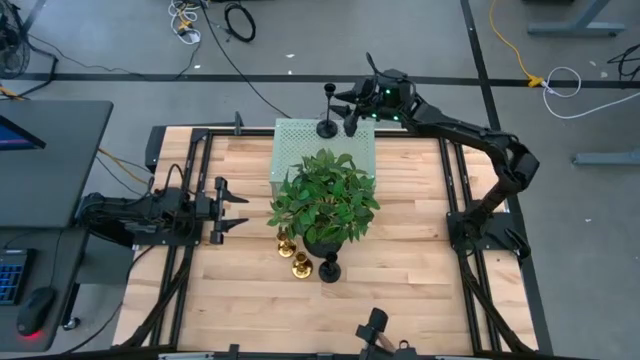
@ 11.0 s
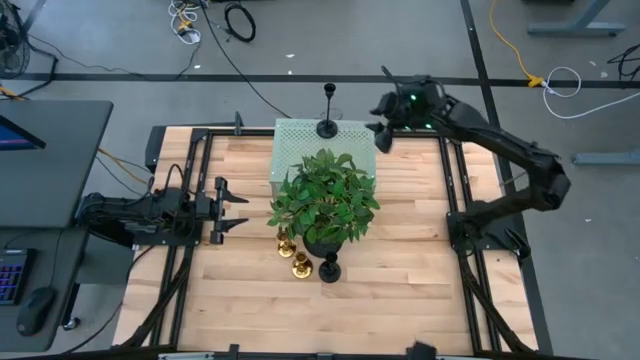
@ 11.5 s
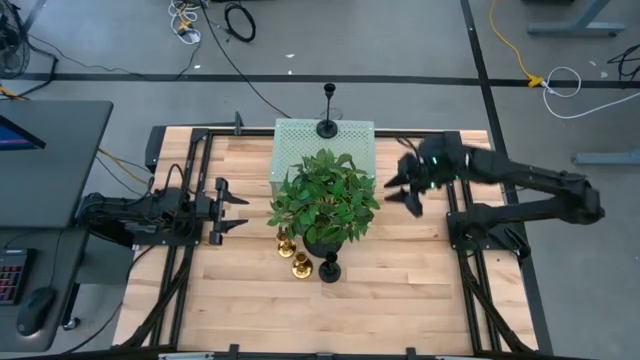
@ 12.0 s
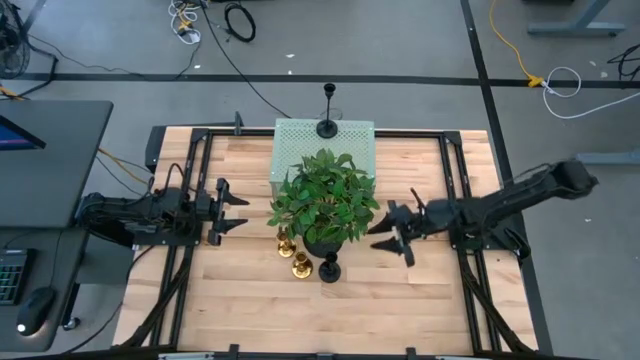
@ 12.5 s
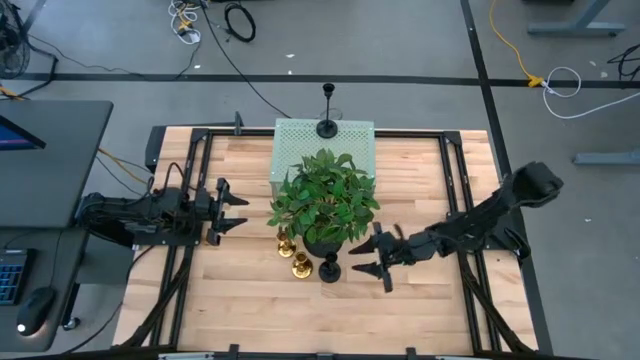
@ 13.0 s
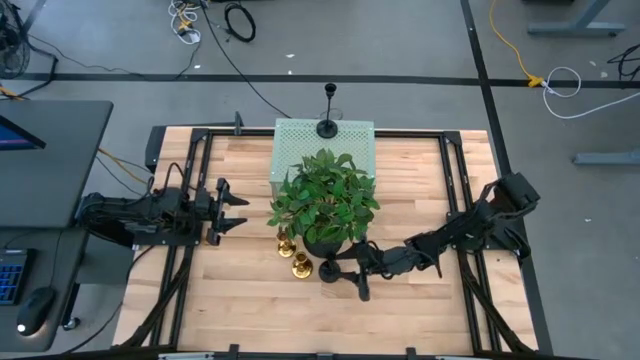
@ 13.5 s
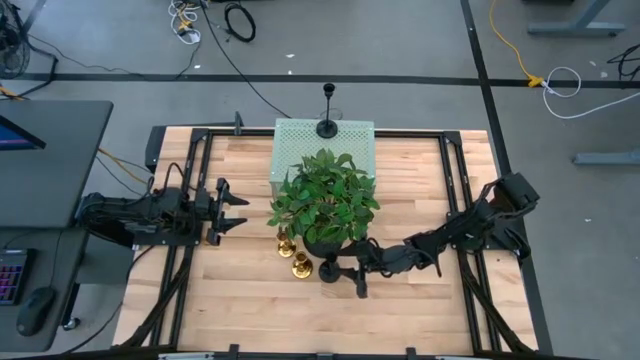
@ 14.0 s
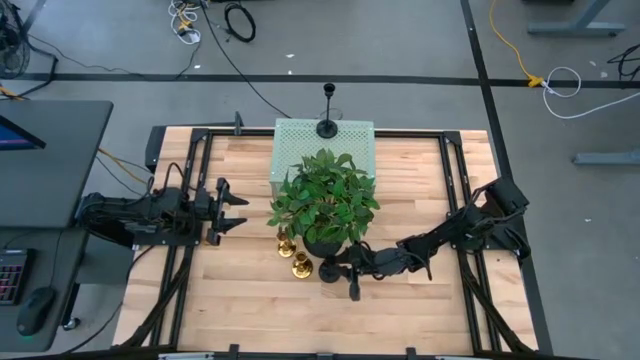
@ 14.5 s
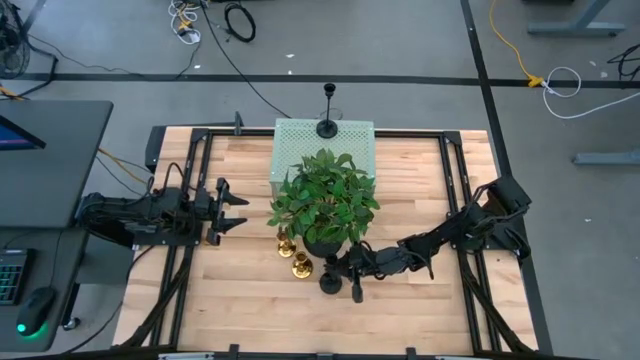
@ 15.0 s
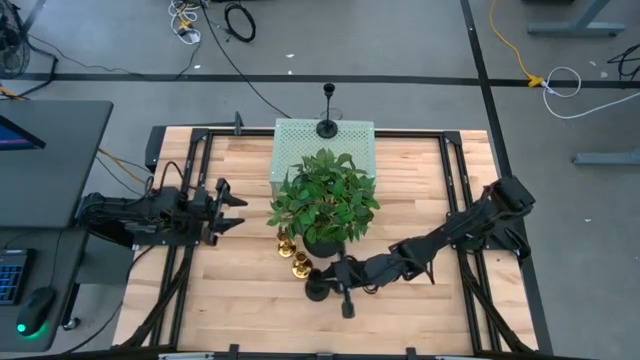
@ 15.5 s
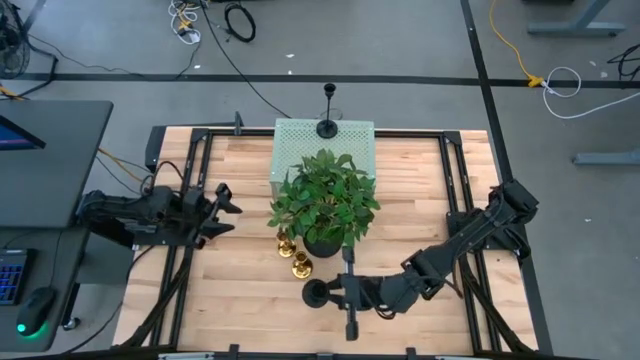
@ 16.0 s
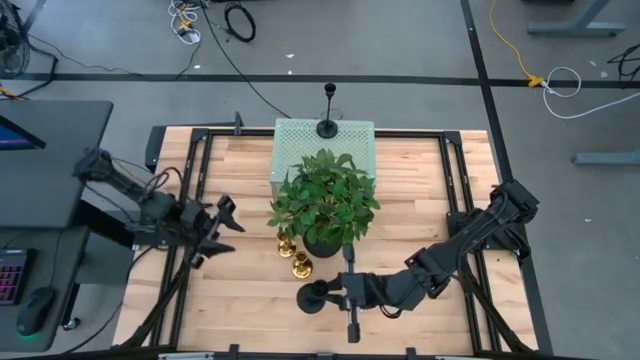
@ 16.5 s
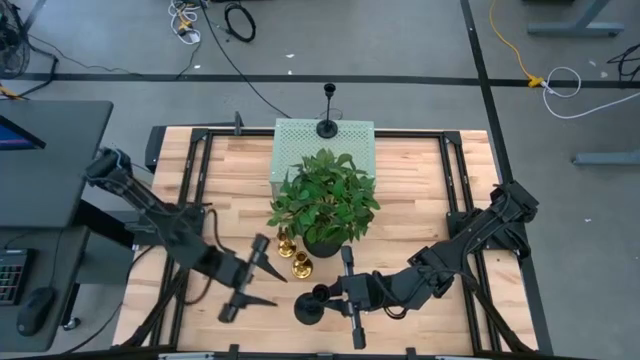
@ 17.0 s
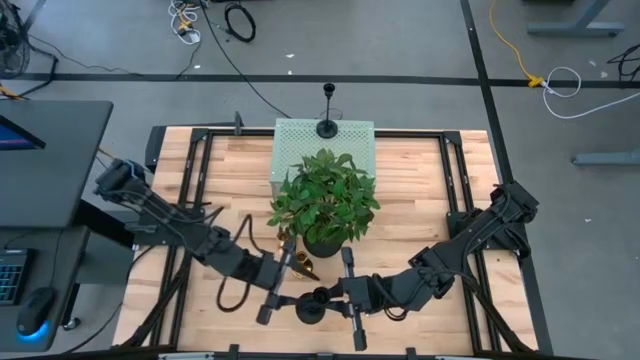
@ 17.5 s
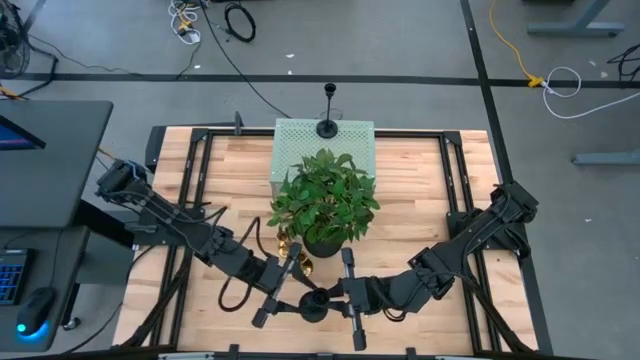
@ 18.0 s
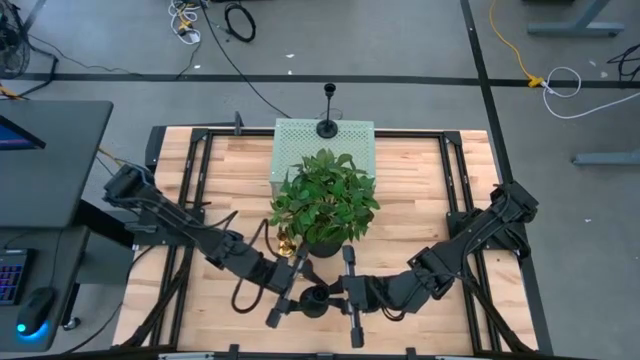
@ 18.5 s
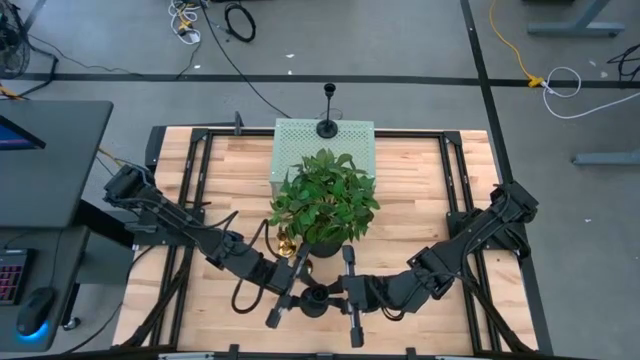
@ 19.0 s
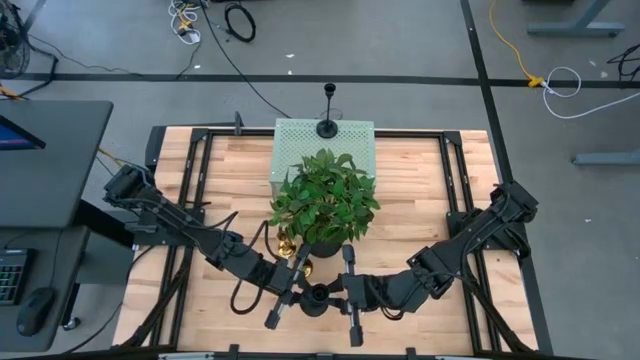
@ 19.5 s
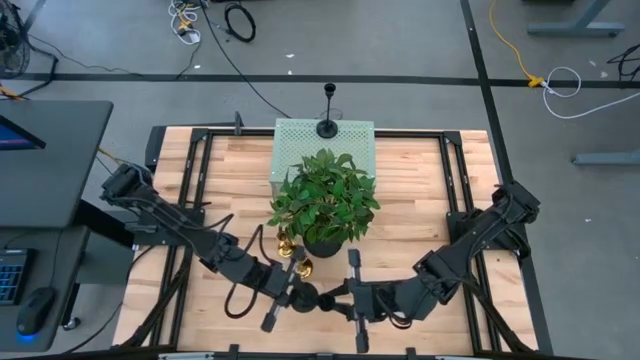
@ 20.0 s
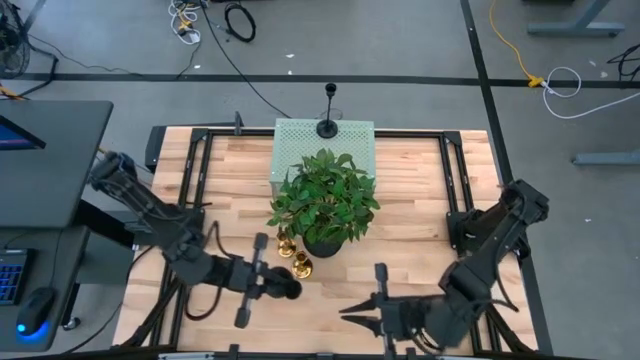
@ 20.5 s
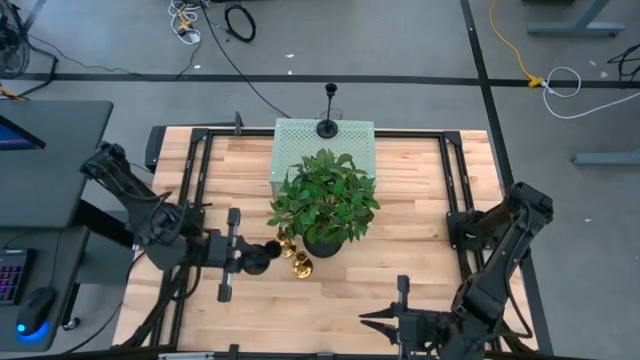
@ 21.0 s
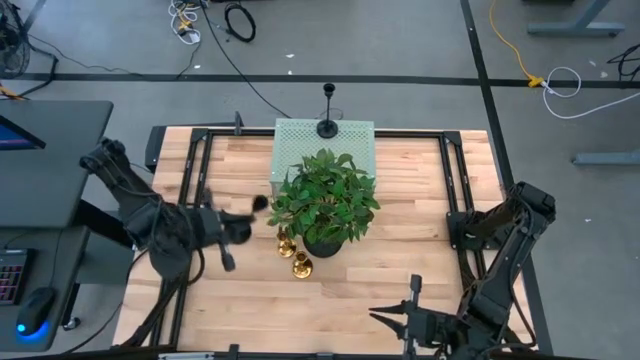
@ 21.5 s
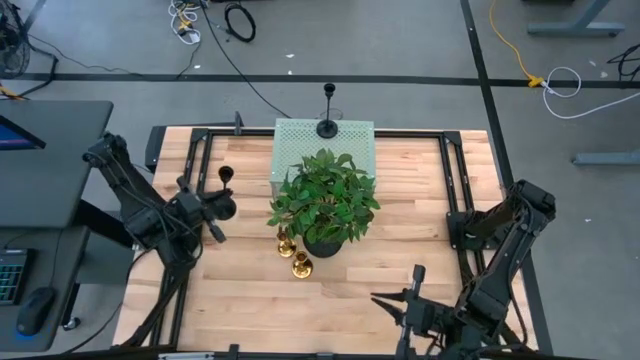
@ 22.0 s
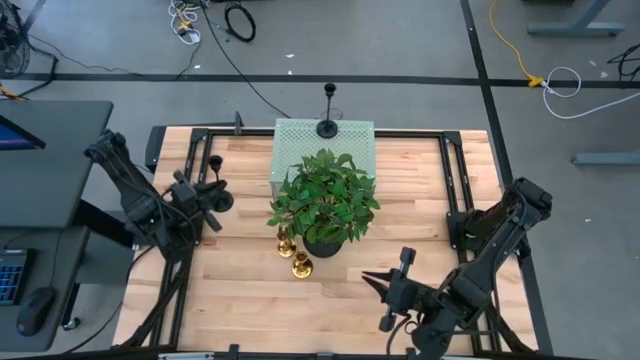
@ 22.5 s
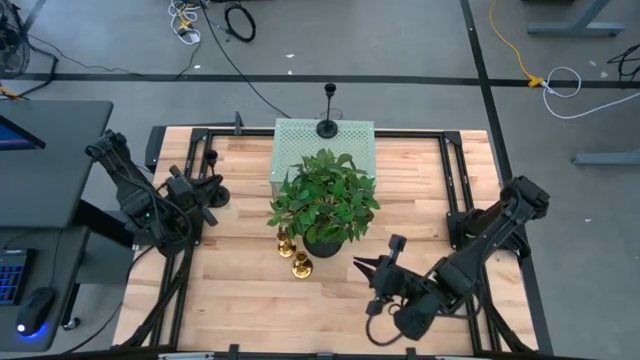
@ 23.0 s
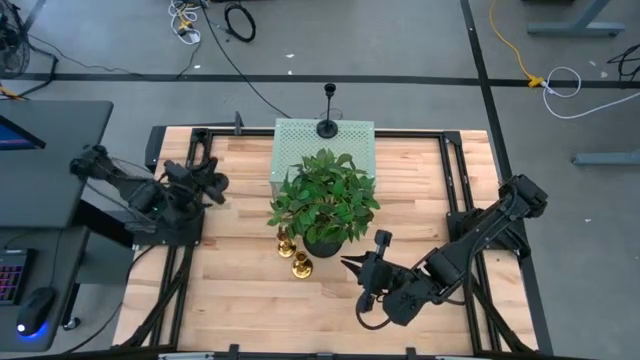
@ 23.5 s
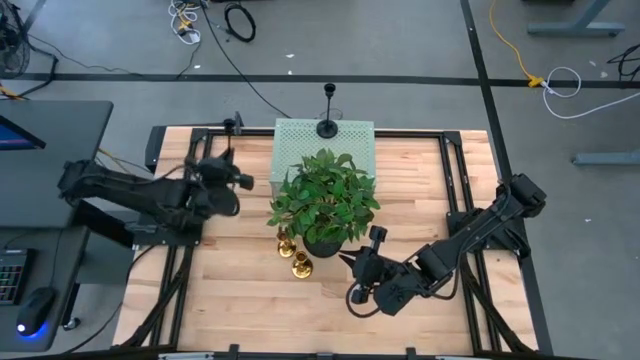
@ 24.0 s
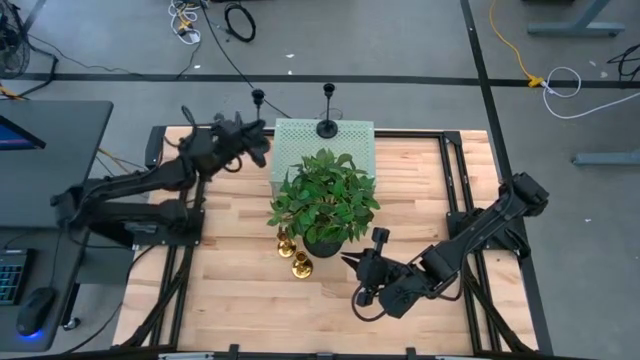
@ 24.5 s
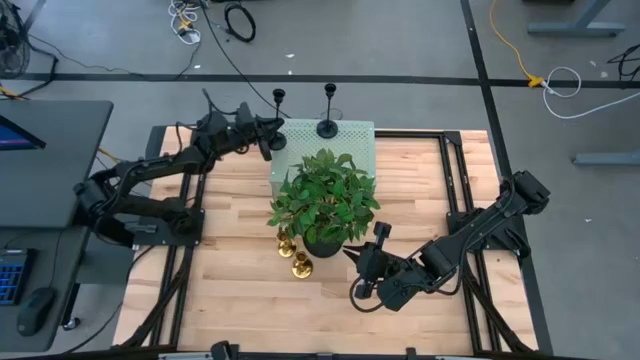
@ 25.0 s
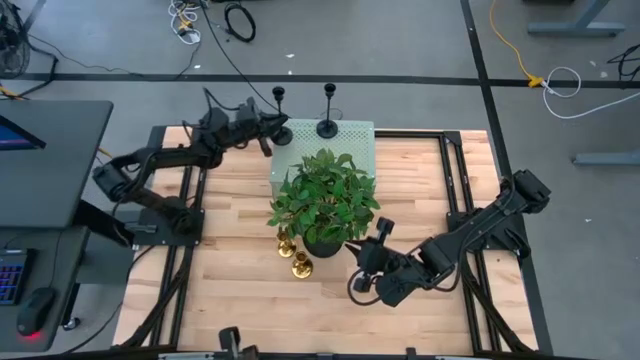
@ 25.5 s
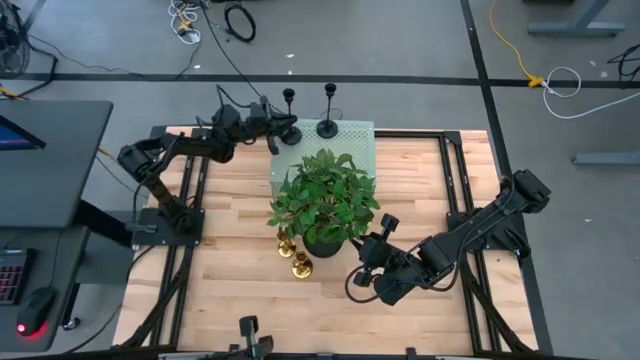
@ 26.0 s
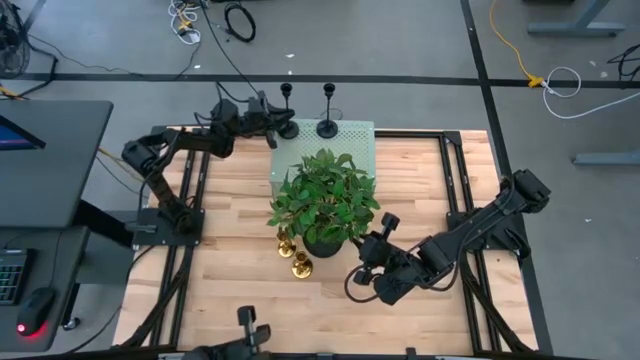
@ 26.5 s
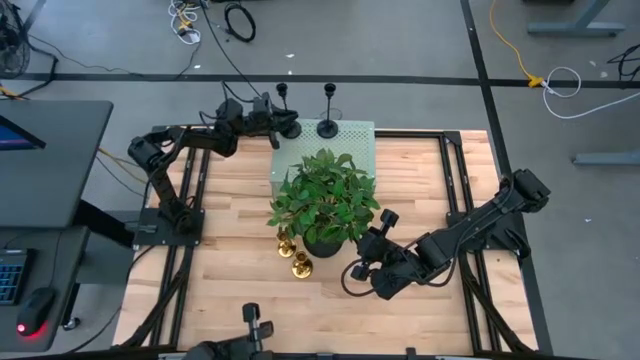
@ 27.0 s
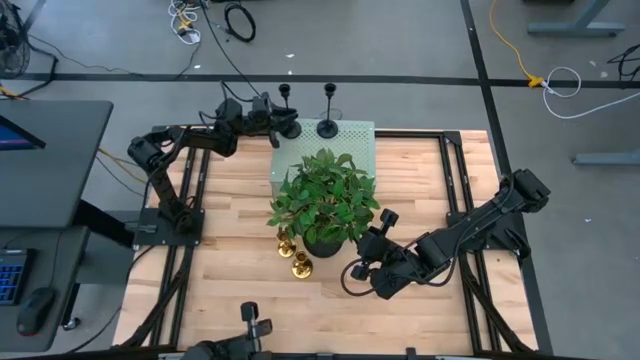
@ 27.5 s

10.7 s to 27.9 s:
Task: Pick & Place candle stick holders
Put the bottom black candle holder on the shelf

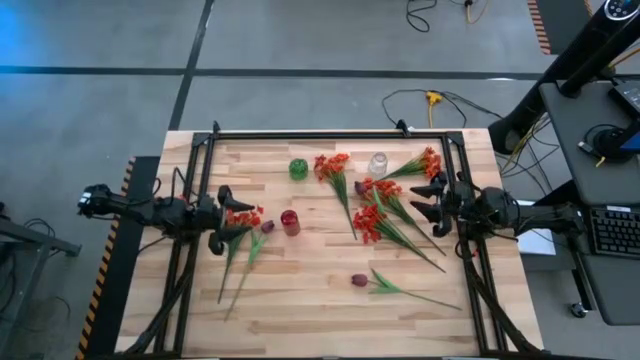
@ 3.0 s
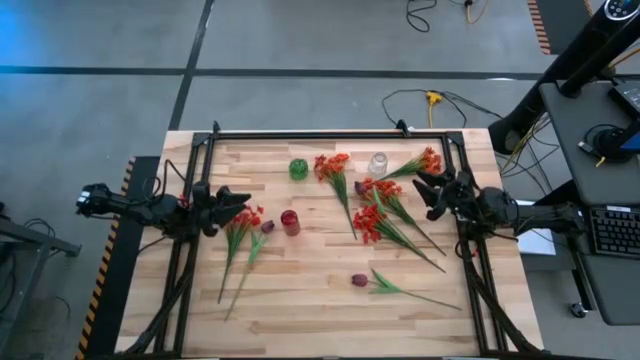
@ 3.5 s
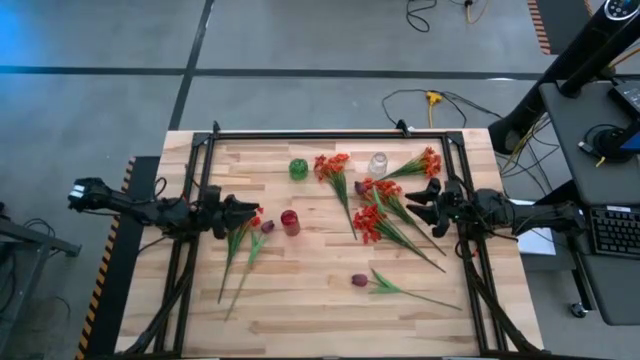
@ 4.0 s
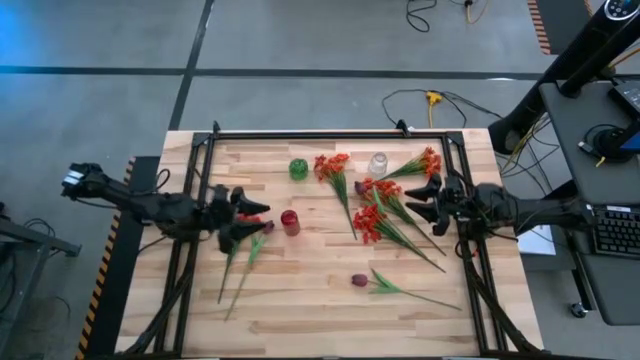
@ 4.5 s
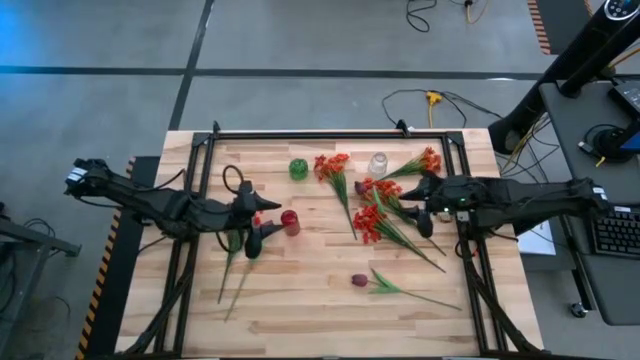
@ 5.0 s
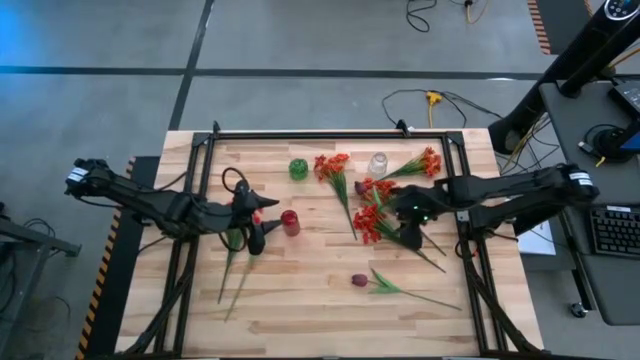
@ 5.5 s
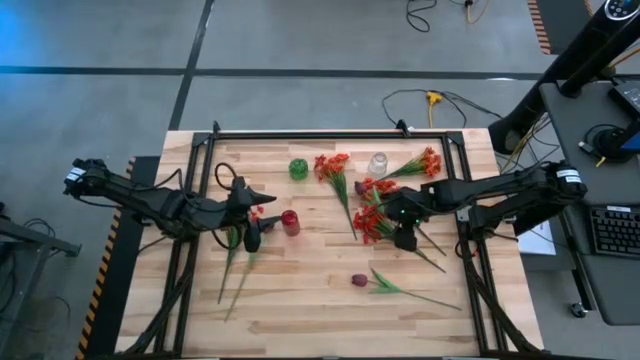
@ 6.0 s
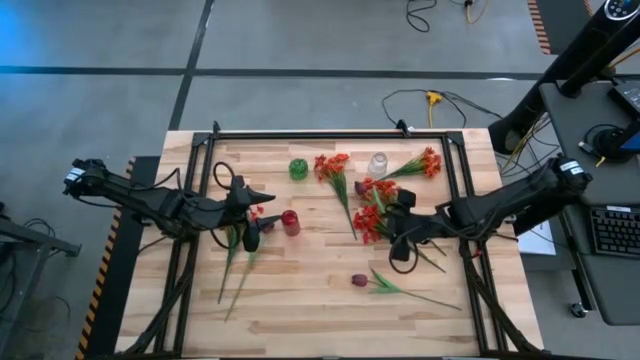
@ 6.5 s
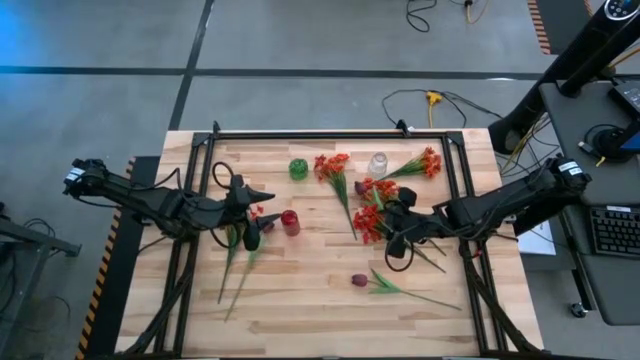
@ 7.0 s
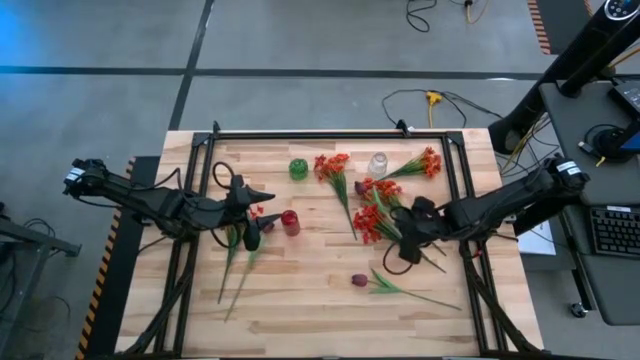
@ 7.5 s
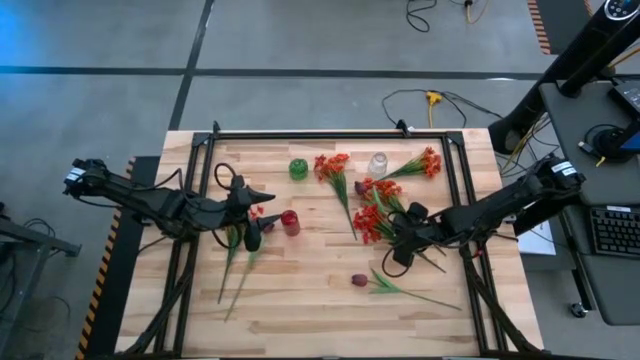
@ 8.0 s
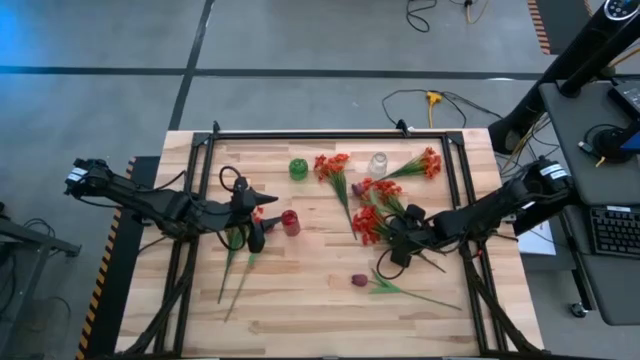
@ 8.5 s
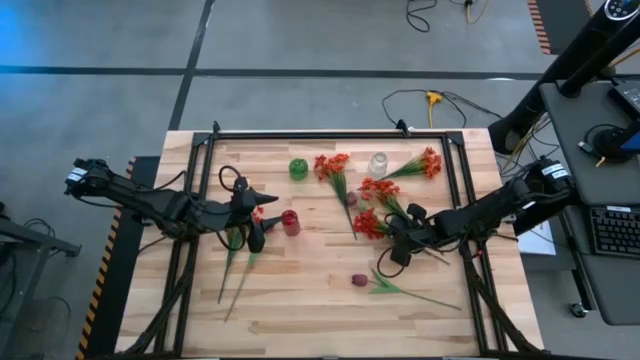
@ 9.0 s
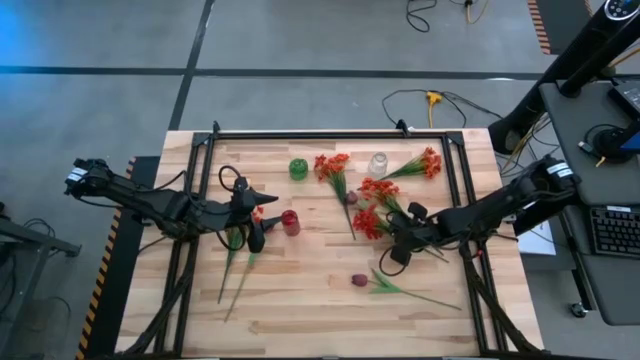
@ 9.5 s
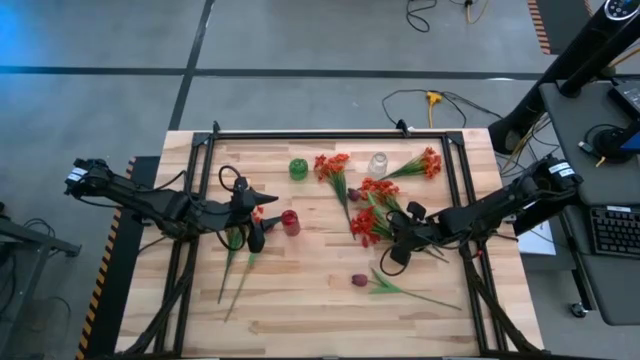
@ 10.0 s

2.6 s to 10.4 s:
Task: Sort flowers into vase by color
Put the right red flowers into the red vase
